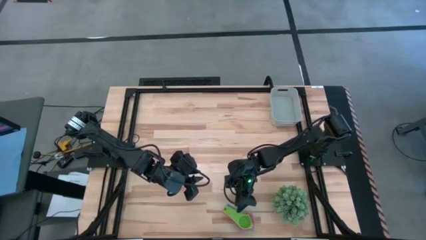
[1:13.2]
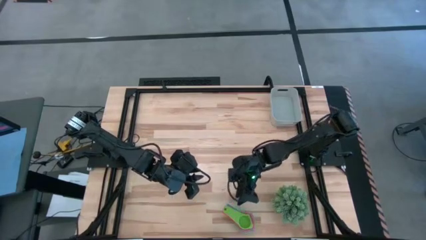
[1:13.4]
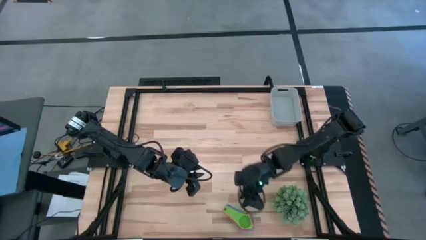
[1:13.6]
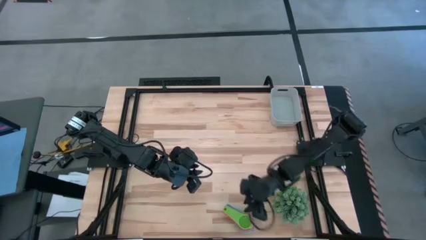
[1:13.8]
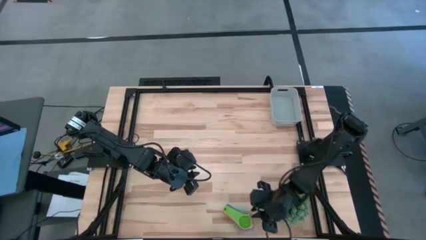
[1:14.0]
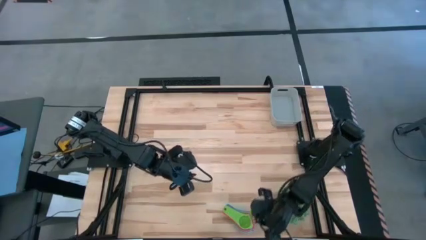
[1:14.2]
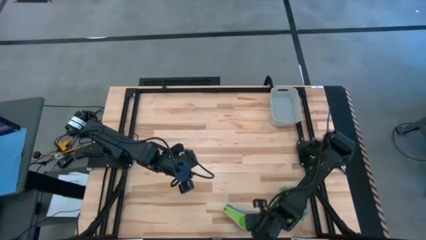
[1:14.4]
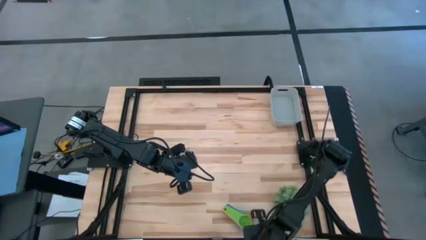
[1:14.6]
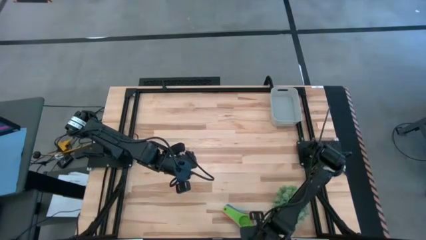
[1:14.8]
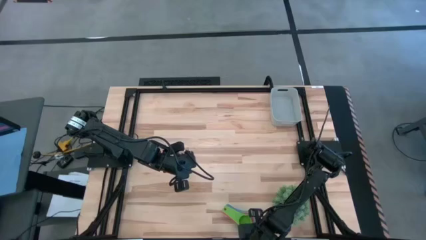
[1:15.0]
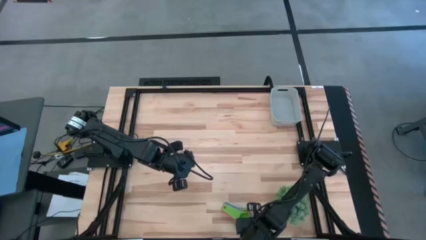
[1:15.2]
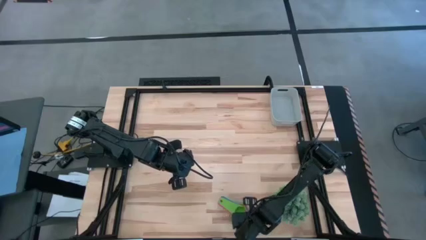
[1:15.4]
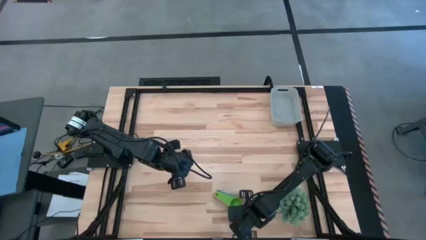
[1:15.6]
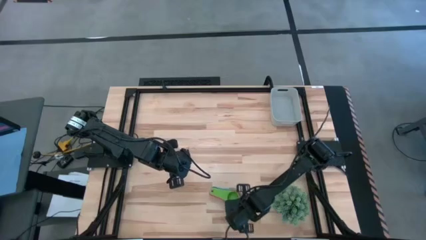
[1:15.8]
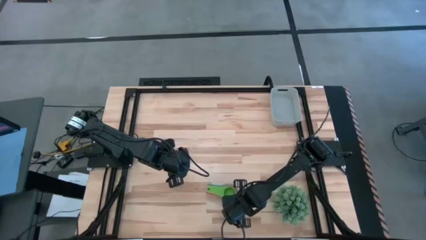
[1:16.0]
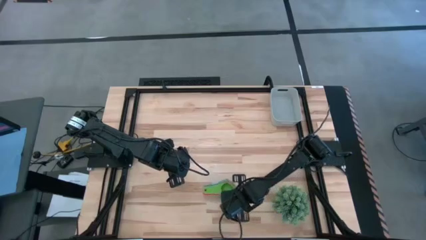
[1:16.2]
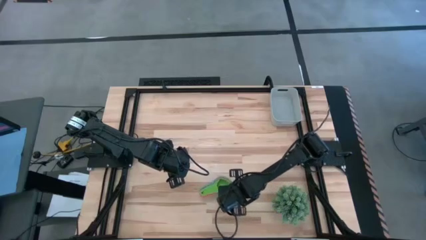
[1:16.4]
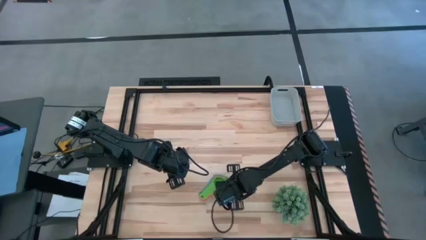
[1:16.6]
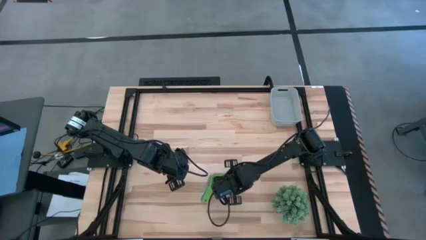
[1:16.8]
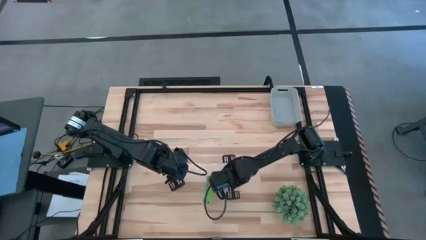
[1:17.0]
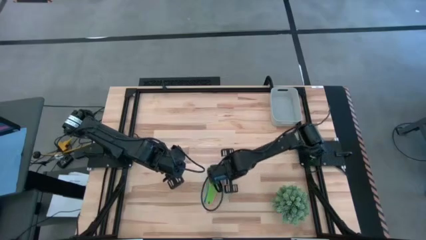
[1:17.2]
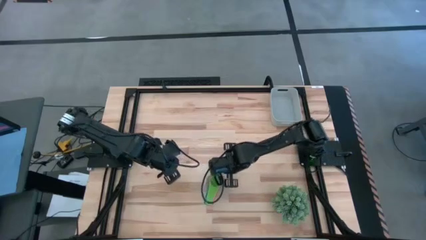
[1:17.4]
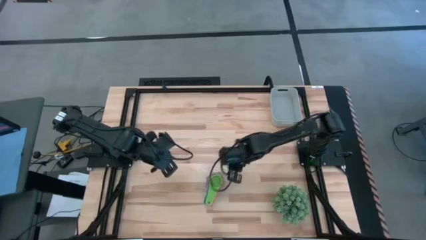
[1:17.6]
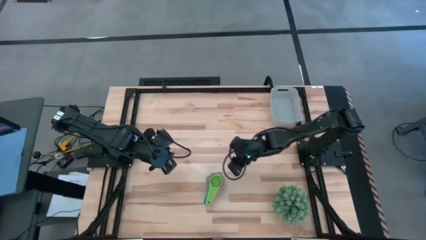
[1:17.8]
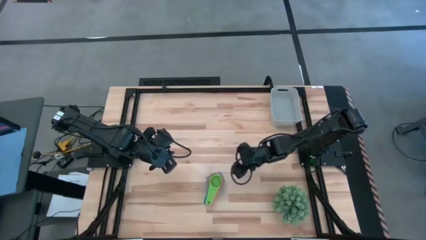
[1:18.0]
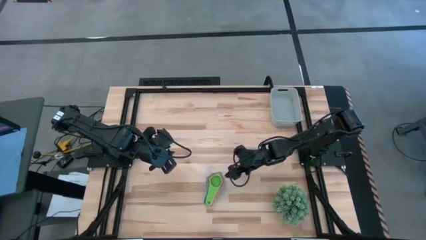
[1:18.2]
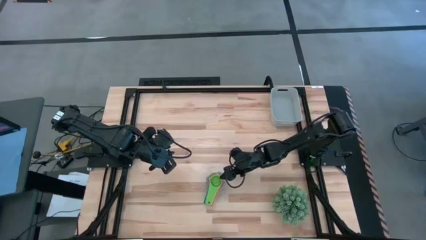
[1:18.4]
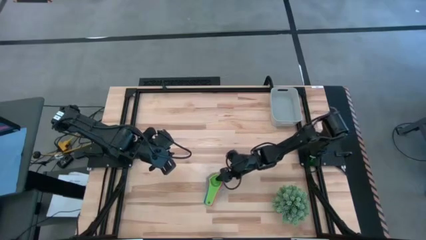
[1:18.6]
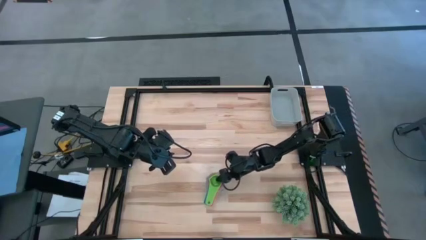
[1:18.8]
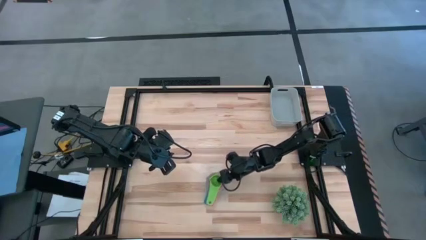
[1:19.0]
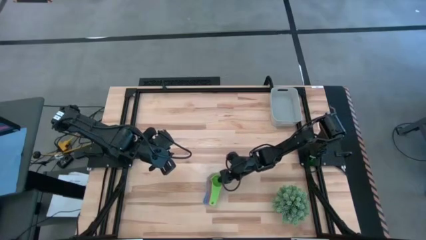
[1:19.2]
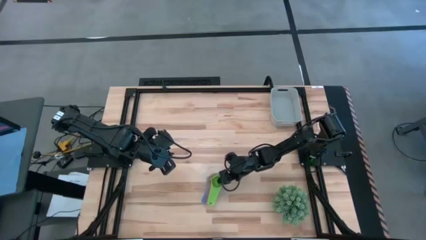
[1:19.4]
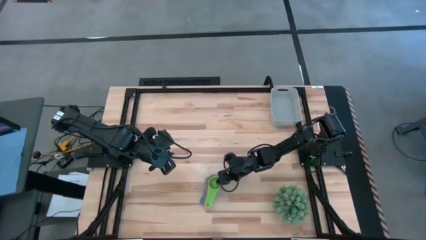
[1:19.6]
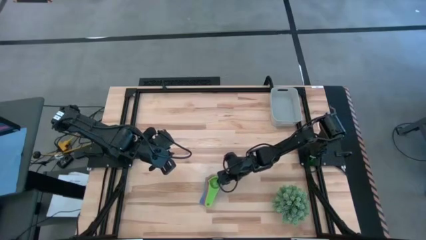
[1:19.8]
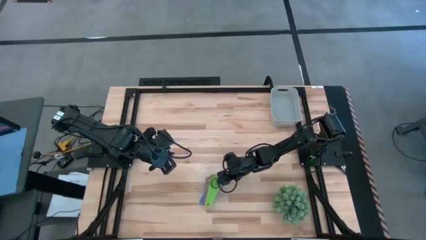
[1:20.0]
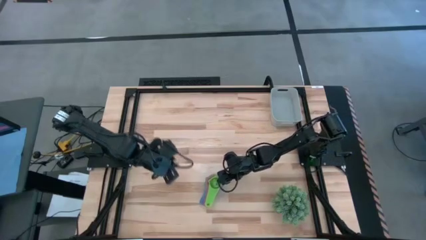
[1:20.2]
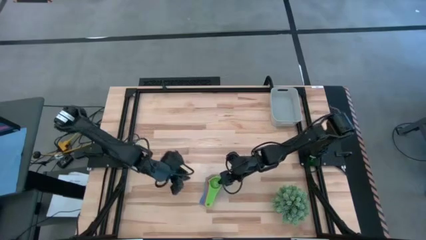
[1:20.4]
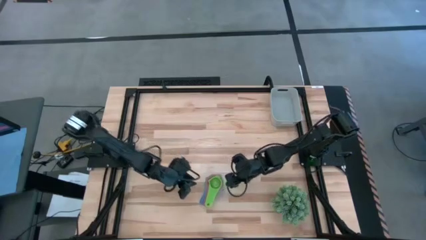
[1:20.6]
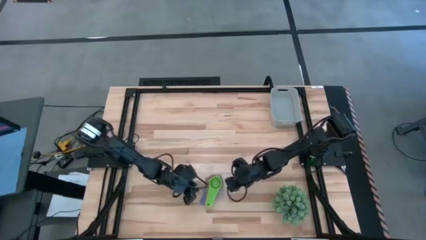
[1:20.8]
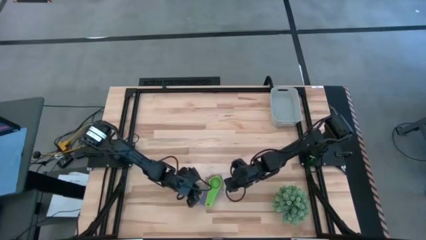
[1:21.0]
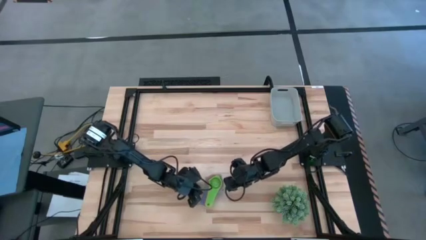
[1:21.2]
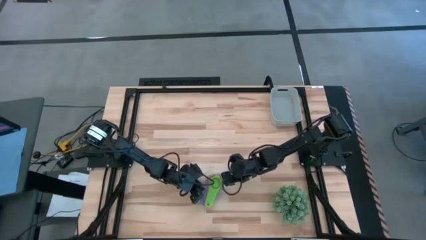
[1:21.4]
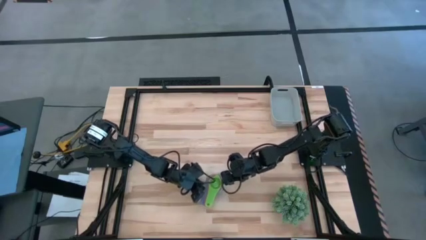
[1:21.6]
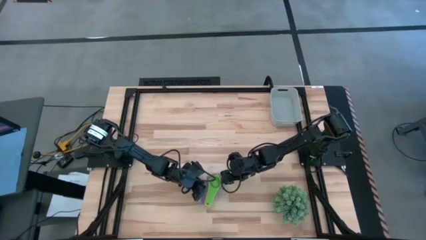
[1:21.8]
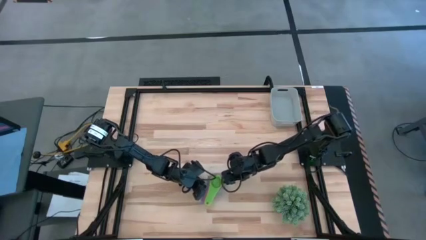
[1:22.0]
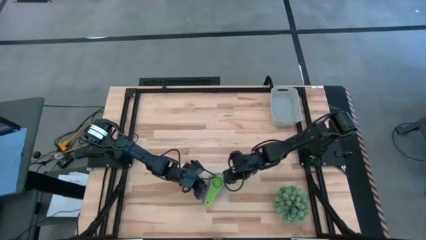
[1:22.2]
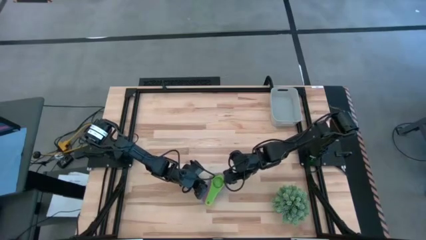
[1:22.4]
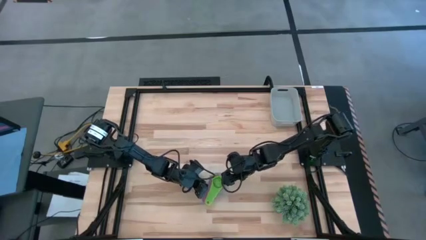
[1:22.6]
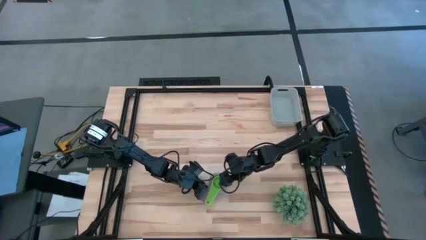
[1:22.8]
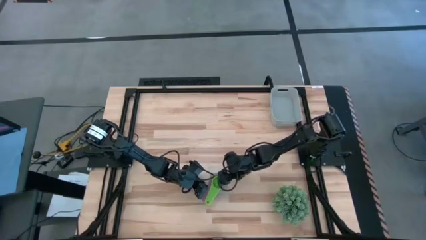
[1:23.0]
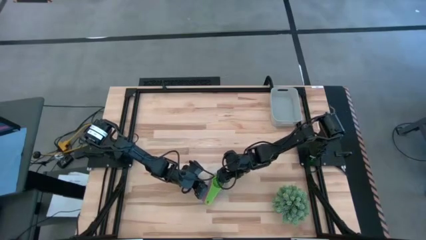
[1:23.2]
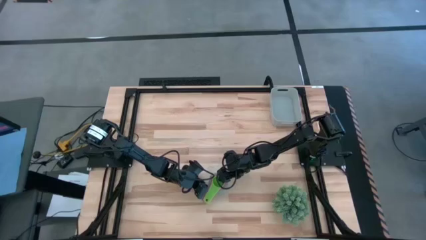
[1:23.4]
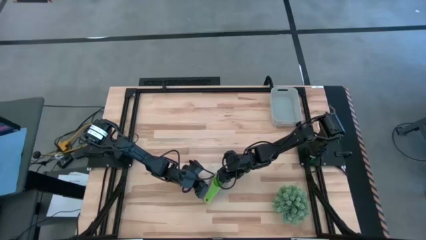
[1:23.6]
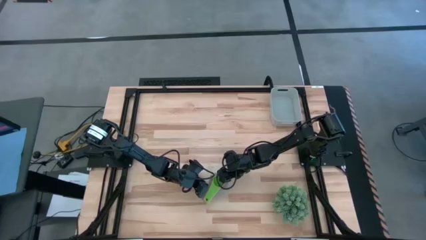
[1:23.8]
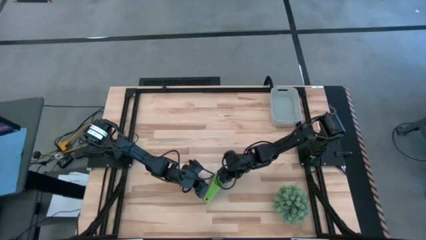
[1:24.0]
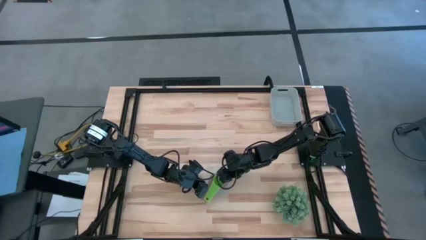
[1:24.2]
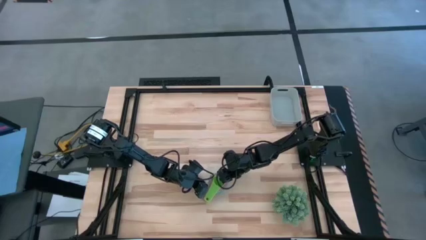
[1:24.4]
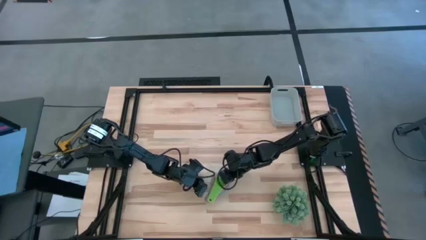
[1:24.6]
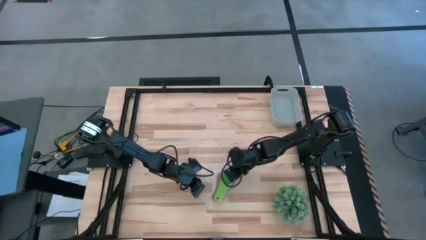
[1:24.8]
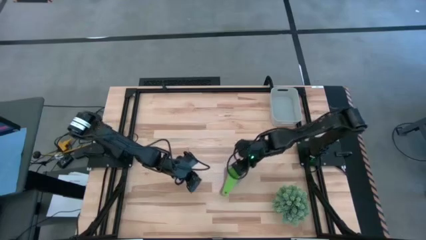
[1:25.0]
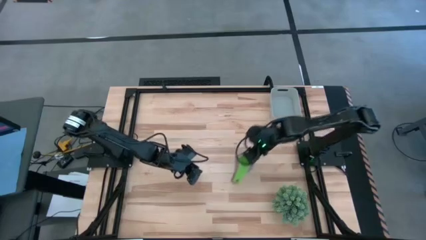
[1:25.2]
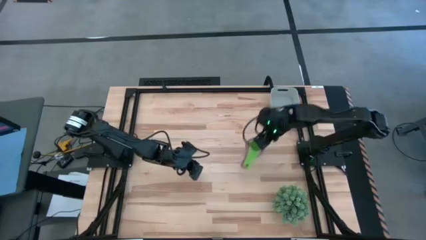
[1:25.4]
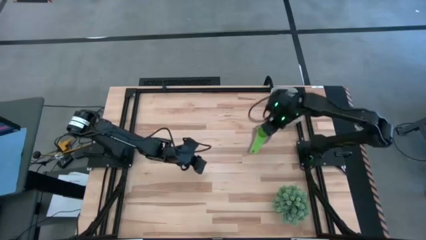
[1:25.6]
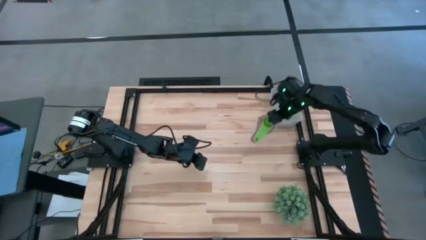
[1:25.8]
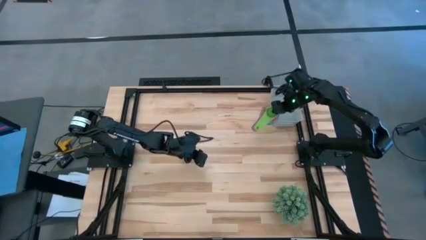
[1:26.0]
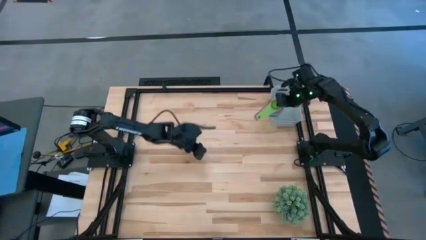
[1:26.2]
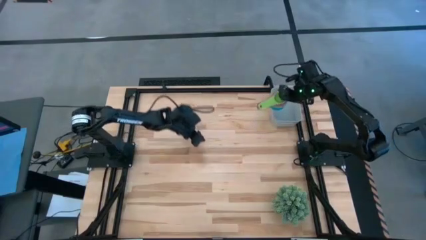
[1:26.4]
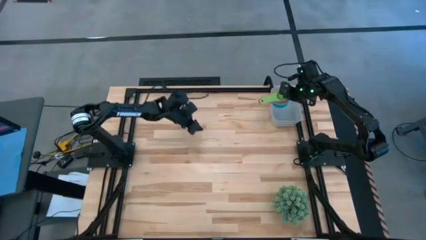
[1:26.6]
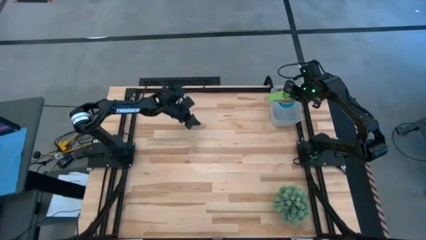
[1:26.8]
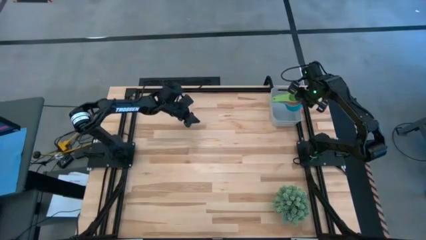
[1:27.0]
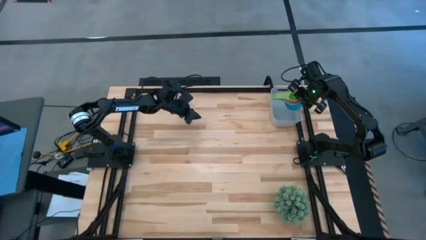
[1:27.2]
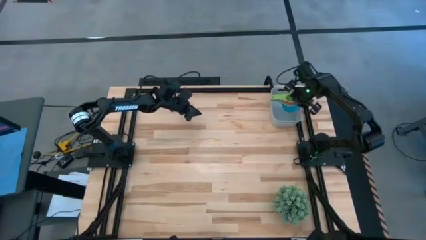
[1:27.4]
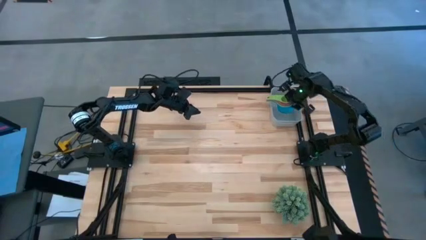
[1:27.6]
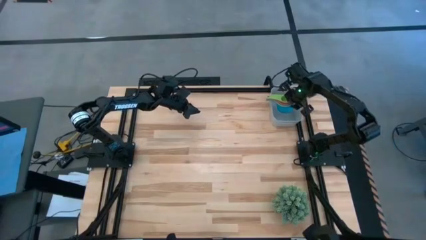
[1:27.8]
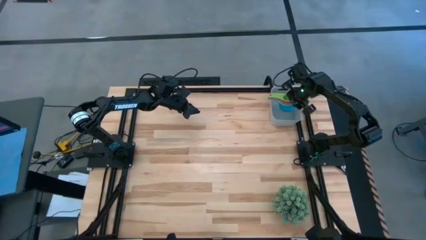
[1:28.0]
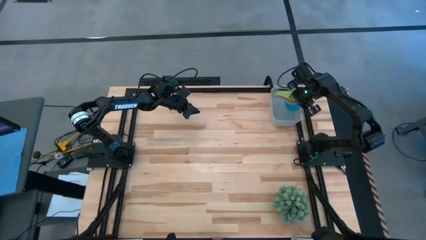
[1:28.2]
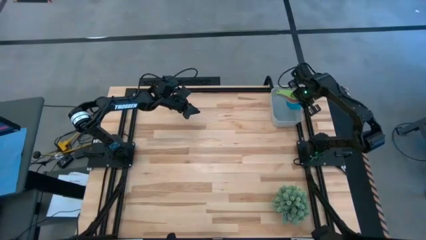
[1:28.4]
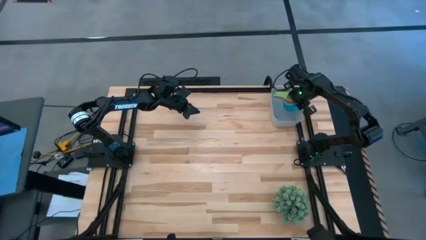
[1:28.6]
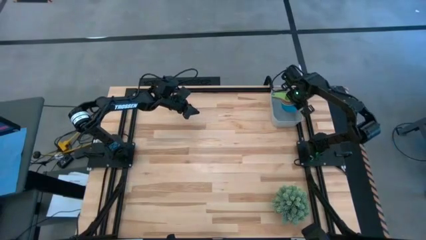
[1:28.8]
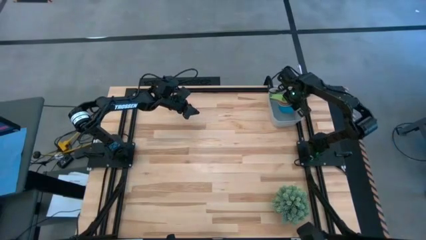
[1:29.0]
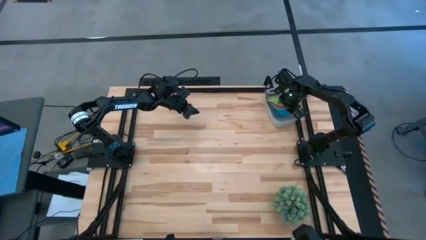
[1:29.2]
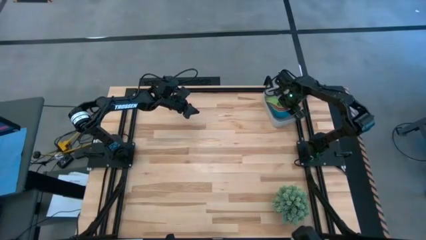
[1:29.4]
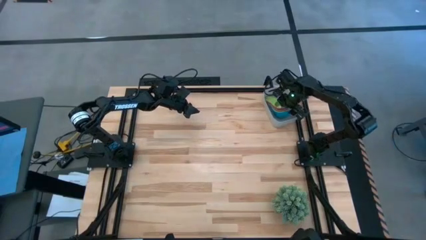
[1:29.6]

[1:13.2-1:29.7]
Task: Nest measuring cups in basket
Put the nested measuring cups into the bin

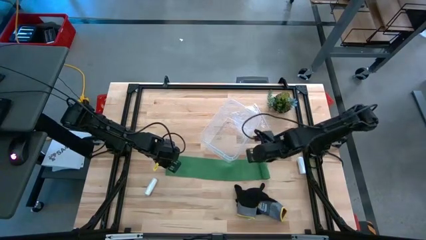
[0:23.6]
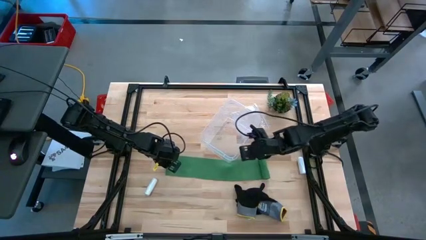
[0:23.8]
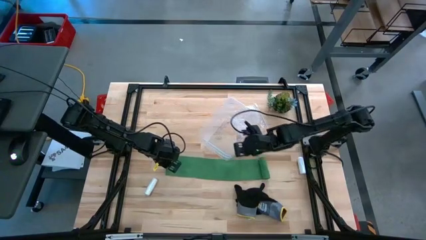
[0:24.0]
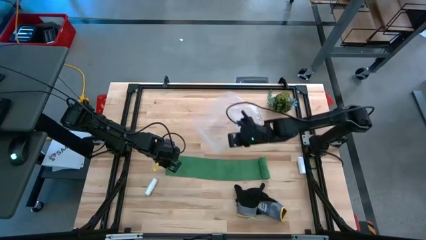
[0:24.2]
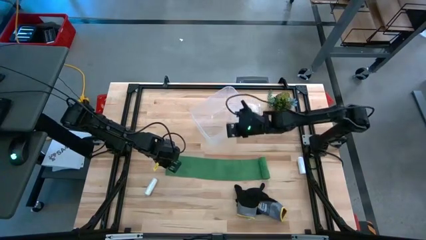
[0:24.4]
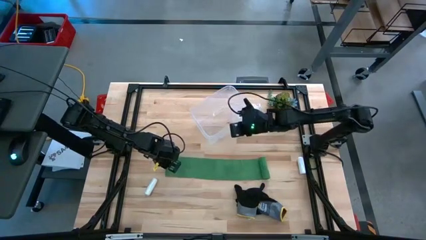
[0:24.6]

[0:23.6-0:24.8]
Task: Roll bandage
Move the transparent bin to the top middle of the table
